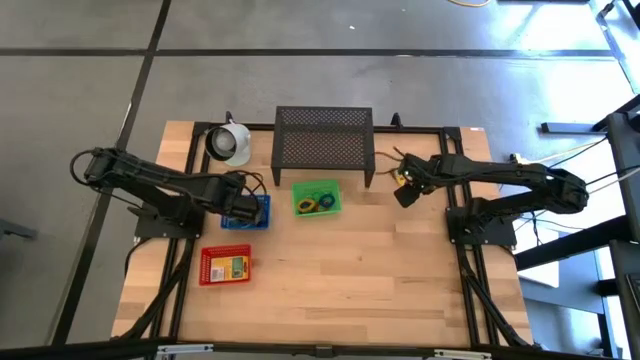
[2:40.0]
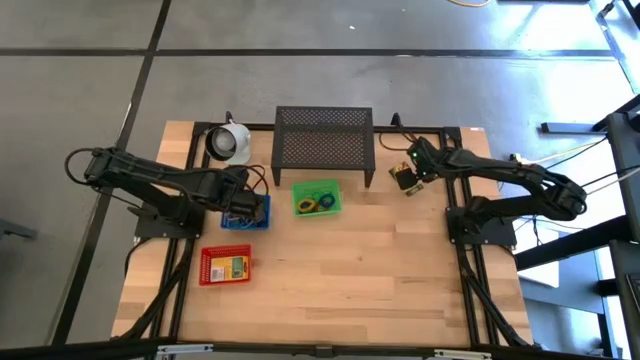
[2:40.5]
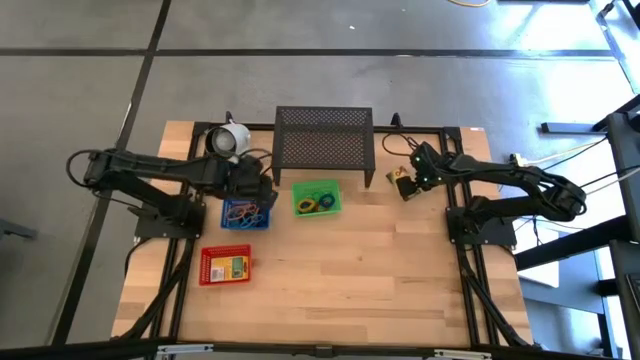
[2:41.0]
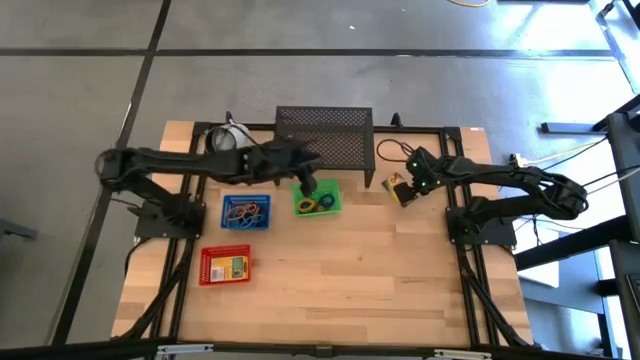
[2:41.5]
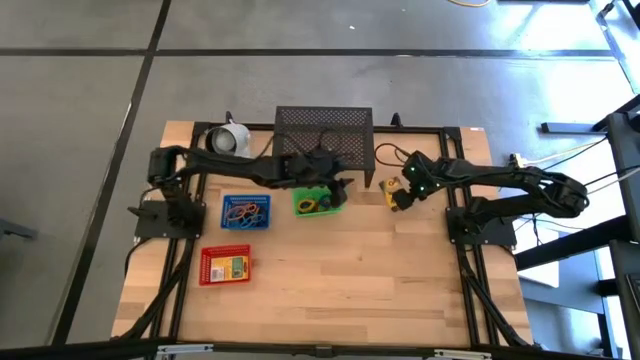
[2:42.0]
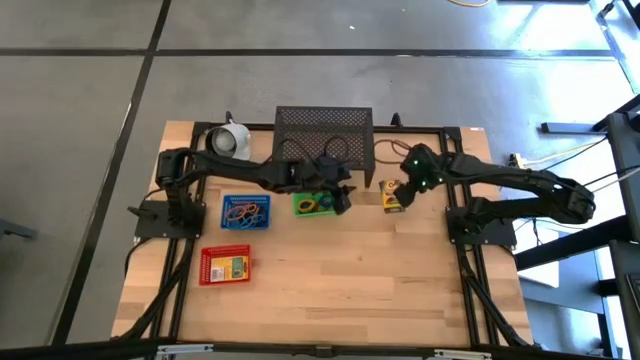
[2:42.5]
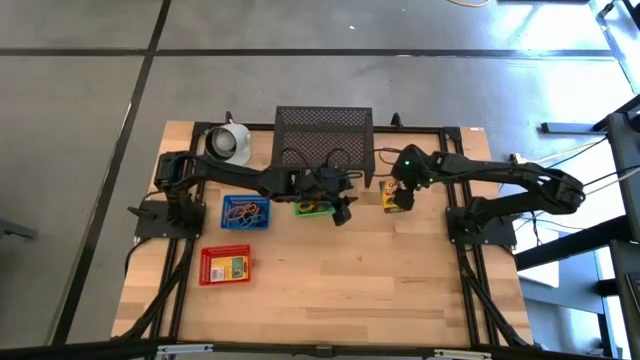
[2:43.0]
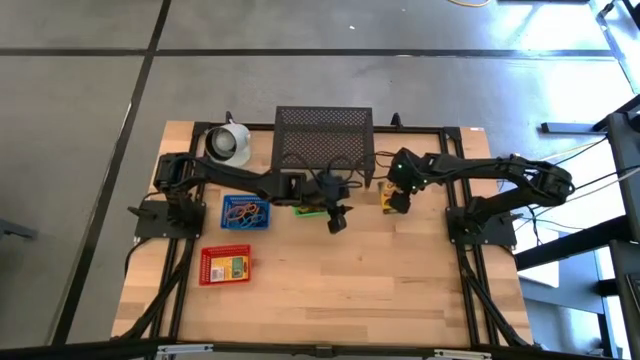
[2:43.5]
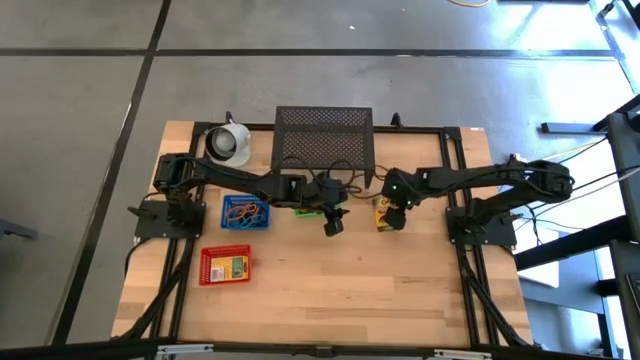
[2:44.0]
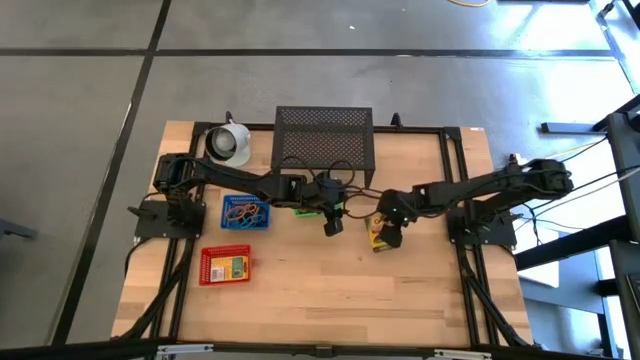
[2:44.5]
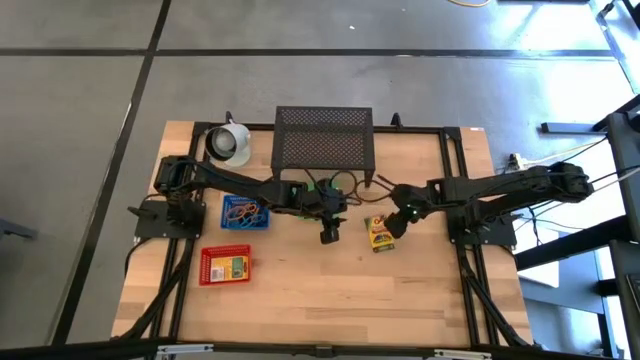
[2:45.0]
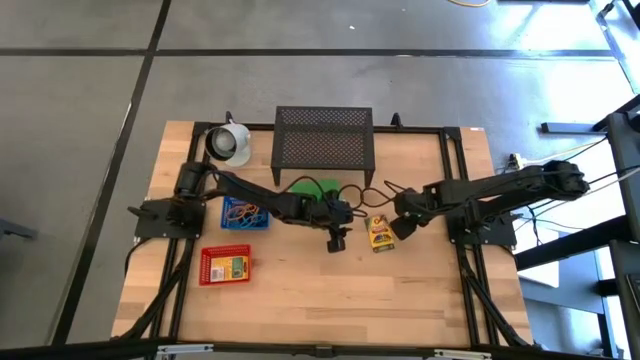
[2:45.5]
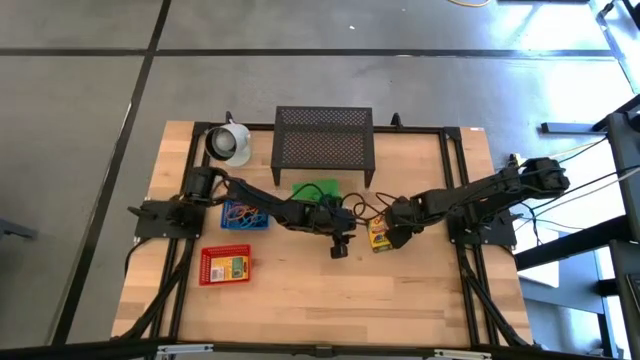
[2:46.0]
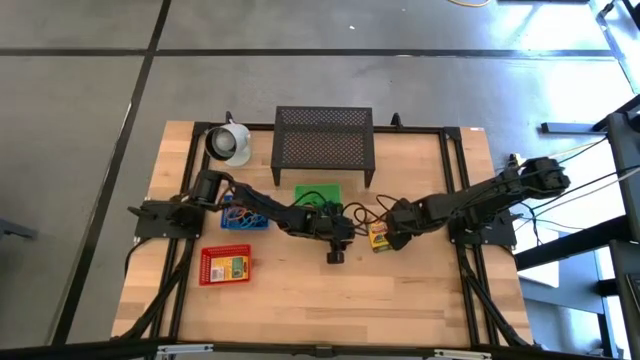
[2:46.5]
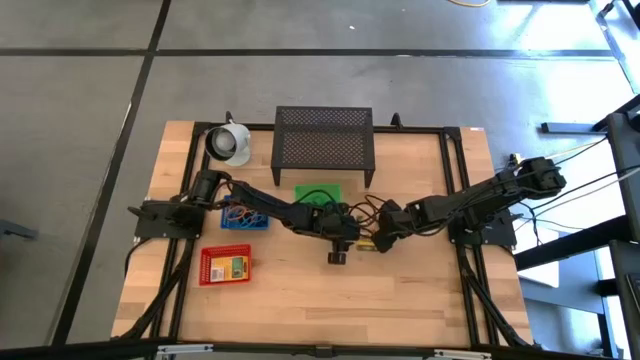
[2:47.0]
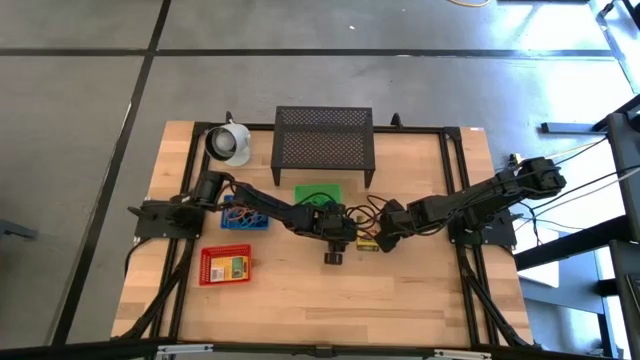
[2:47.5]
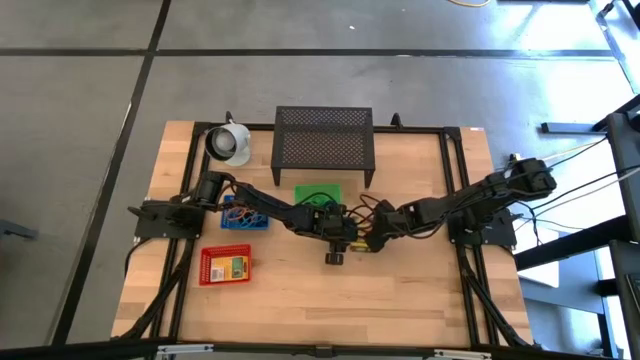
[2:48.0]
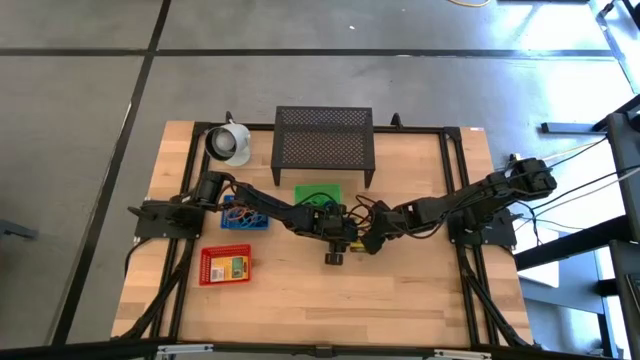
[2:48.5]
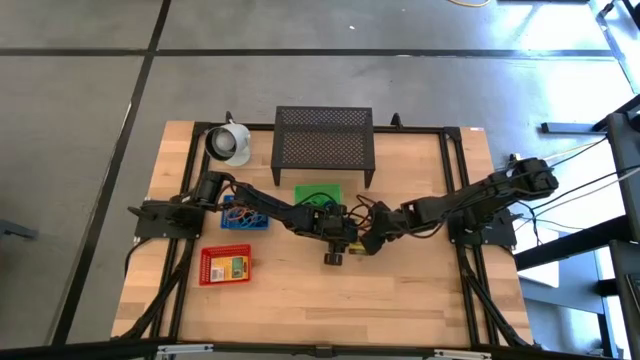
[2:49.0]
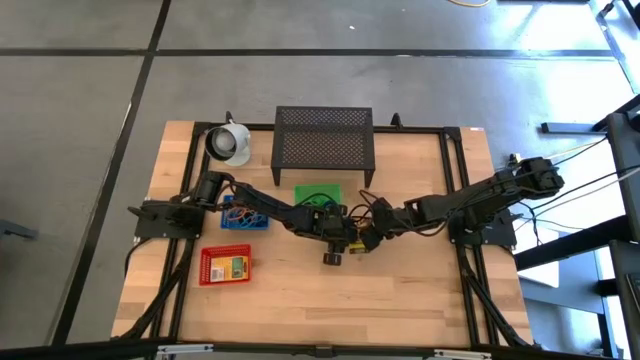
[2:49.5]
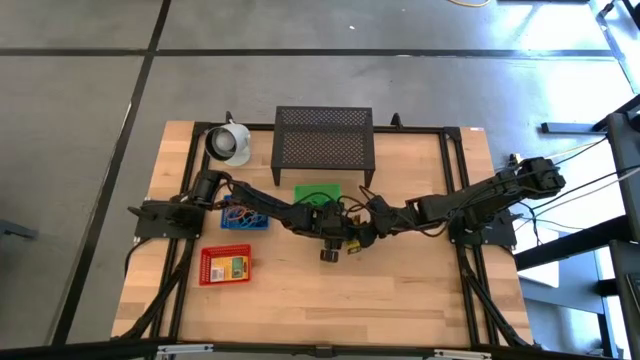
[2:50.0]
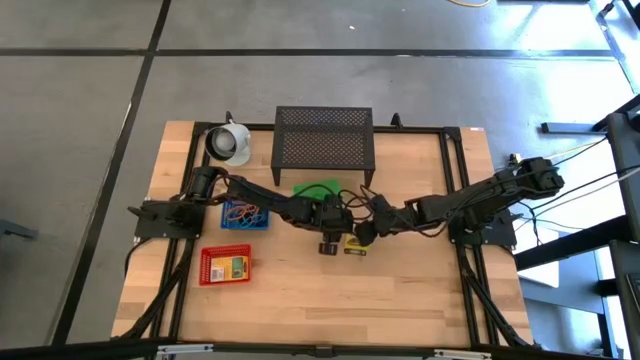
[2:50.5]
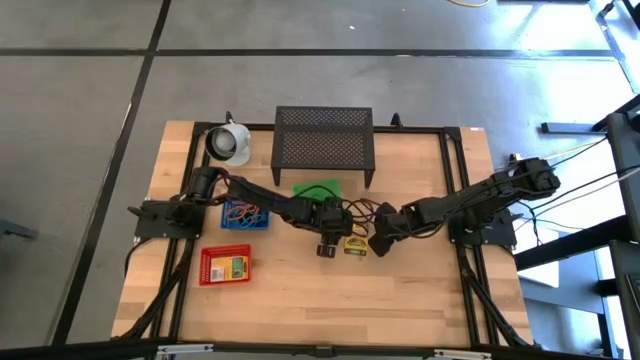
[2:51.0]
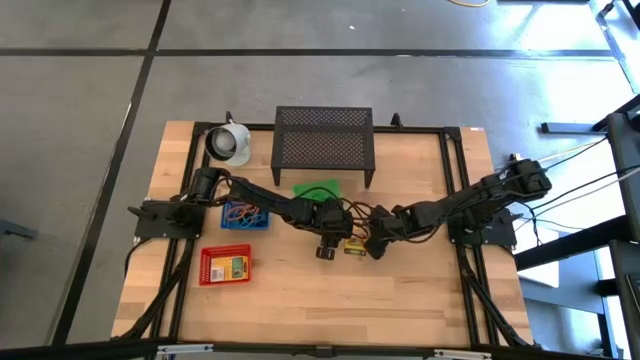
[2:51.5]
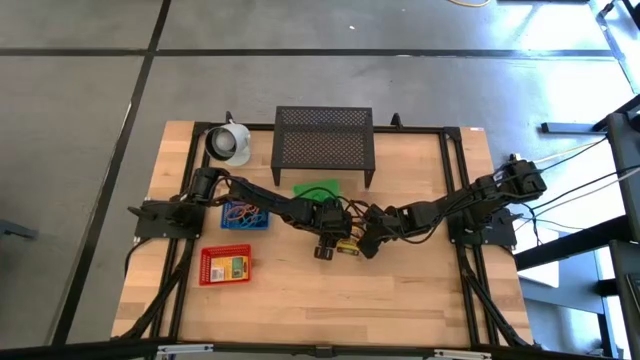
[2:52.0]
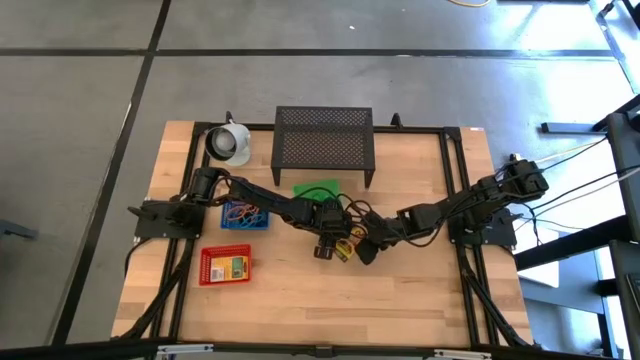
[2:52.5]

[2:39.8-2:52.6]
Task: Pick & Place Office Desk Supplies
Put the yellow box of crayon into the red bin

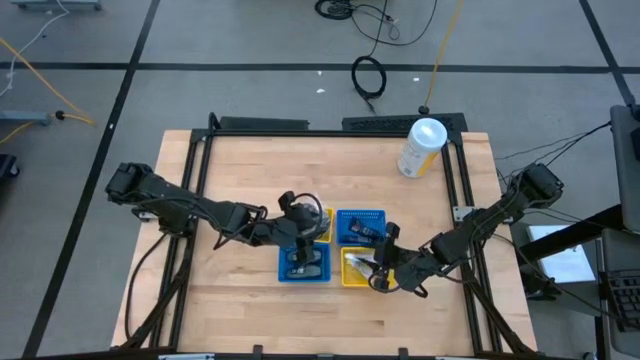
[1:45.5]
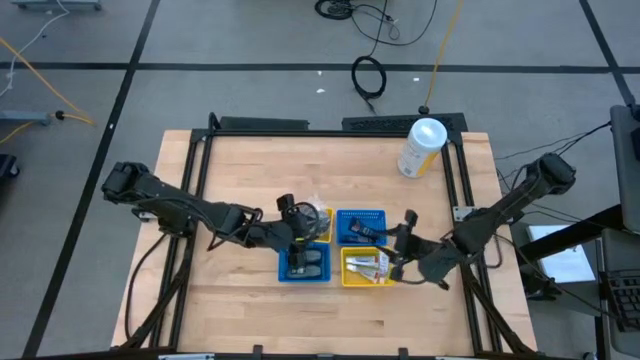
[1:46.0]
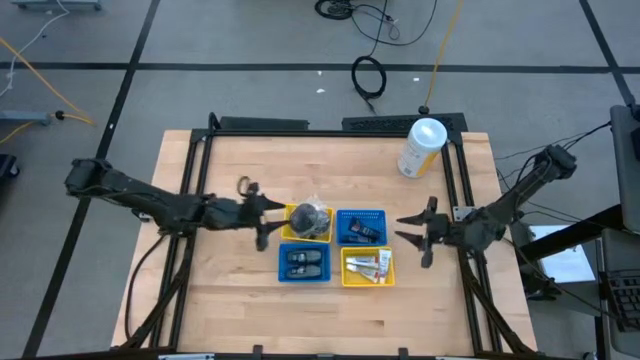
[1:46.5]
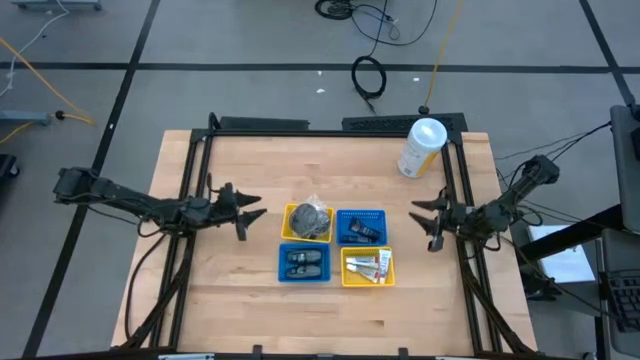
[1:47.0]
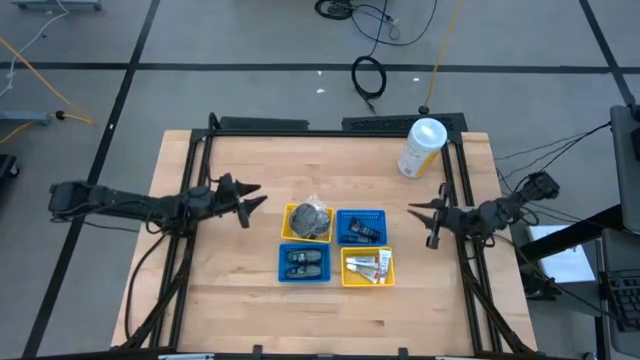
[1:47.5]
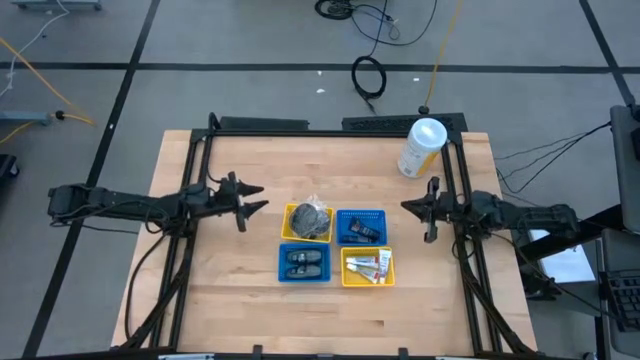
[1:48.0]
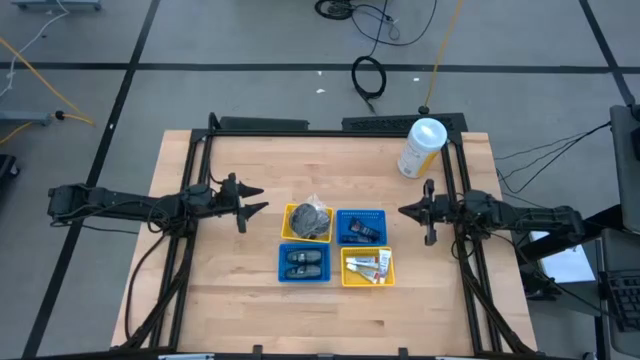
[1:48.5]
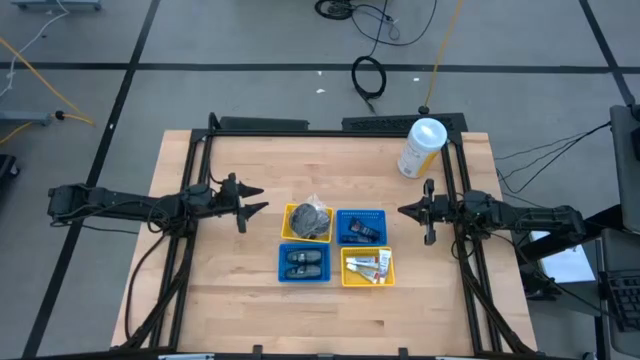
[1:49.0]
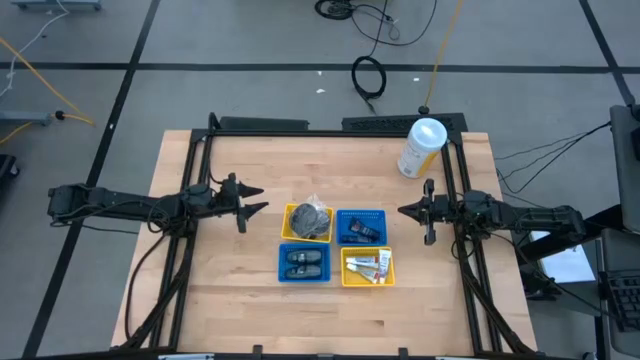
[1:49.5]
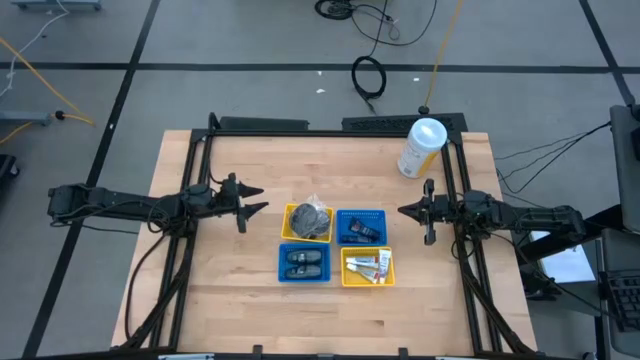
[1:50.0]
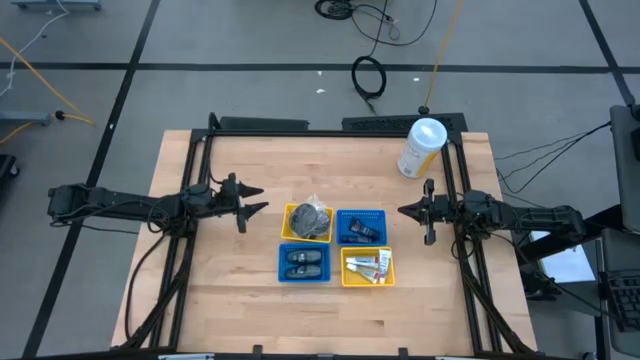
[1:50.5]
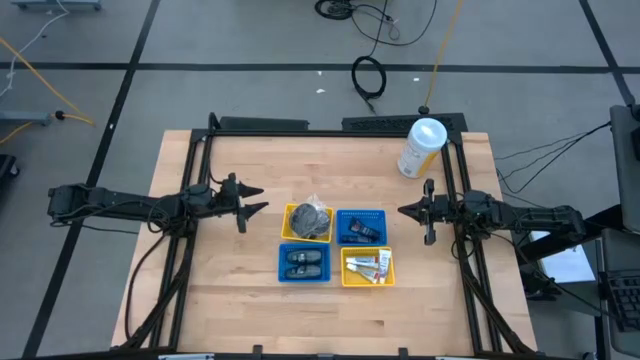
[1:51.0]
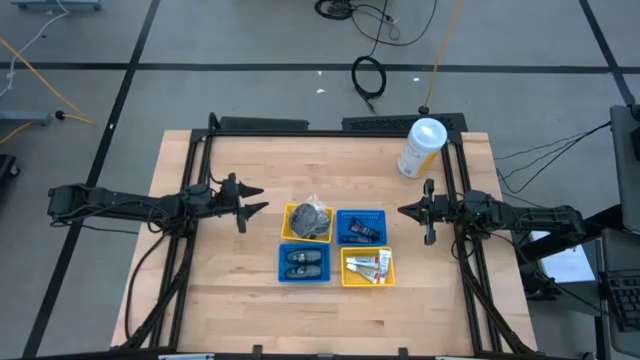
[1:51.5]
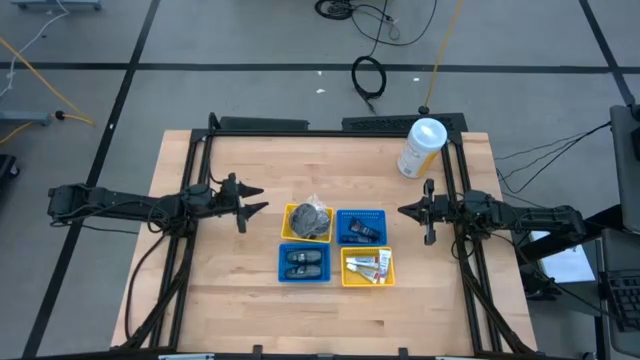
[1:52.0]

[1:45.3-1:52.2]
Task: Pick & Place Travel size toiletries
Return to Home Position

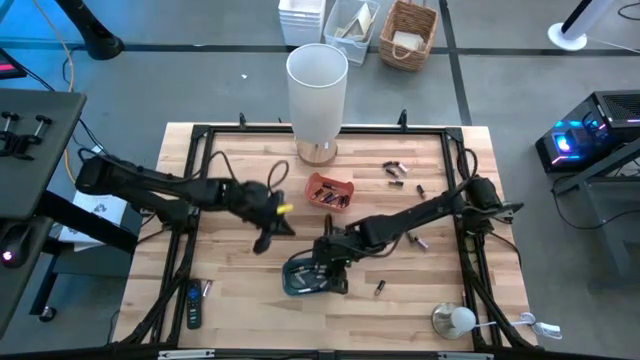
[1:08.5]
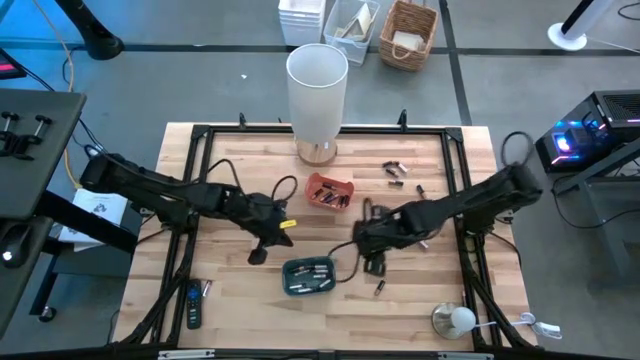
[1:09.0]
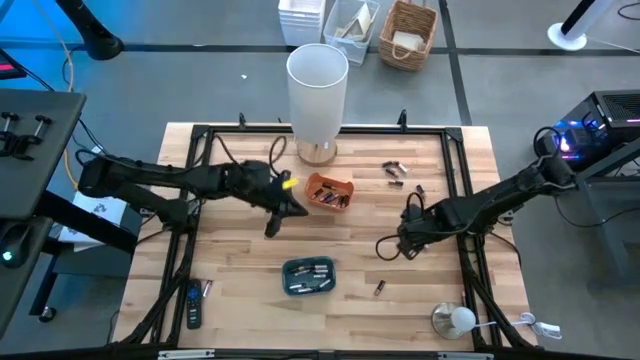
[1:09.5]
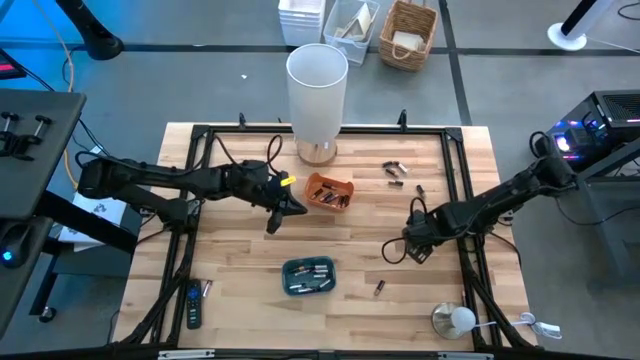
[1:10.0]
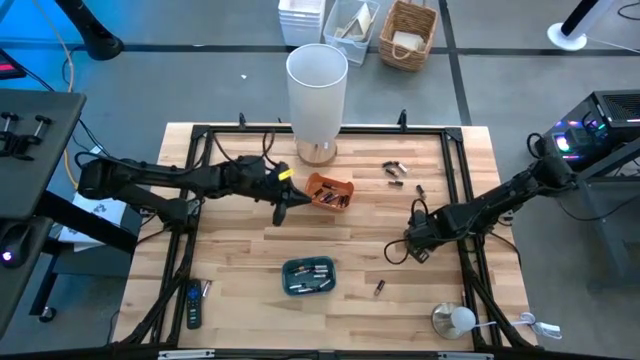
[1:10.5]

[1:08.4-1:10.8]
Task: Sort batteries
Put the silver battery into the blue bin
